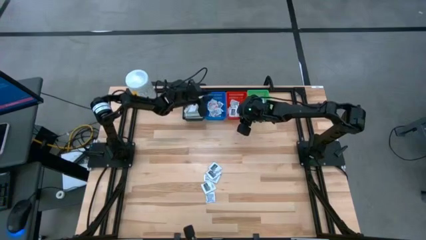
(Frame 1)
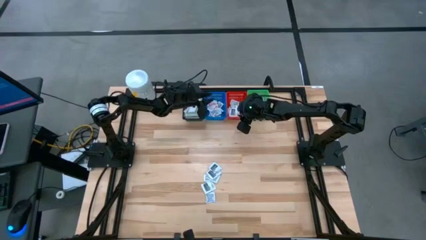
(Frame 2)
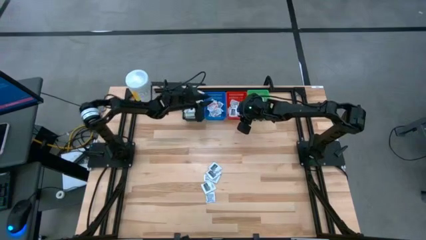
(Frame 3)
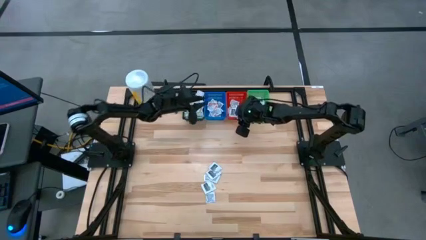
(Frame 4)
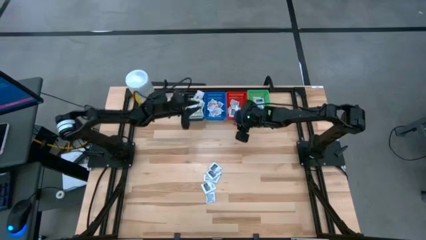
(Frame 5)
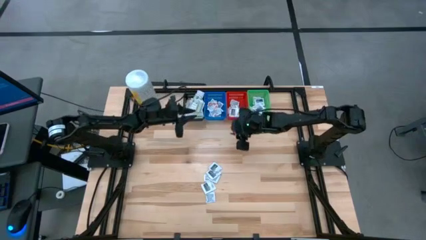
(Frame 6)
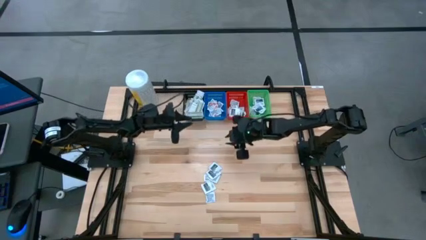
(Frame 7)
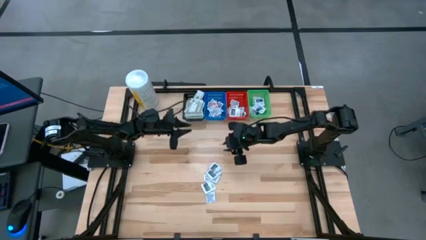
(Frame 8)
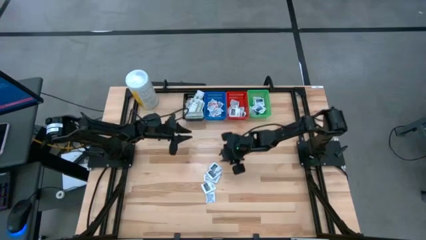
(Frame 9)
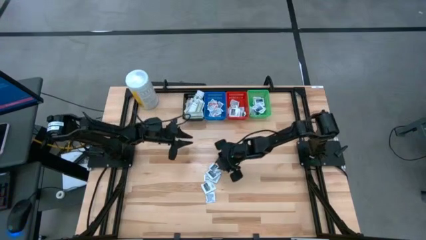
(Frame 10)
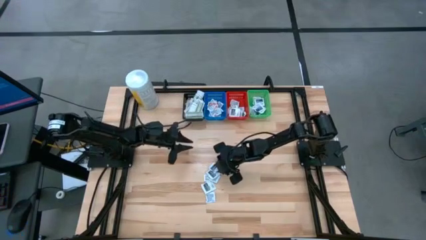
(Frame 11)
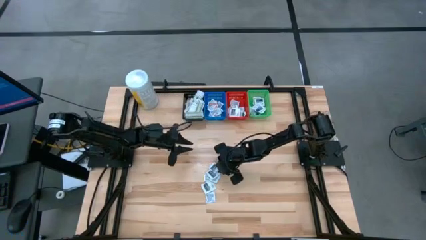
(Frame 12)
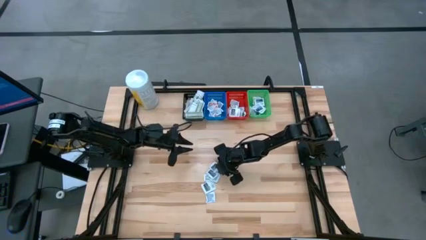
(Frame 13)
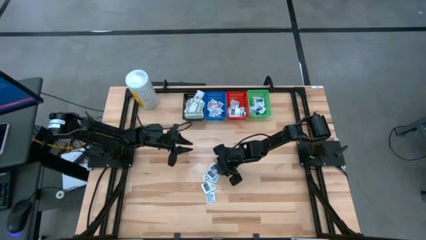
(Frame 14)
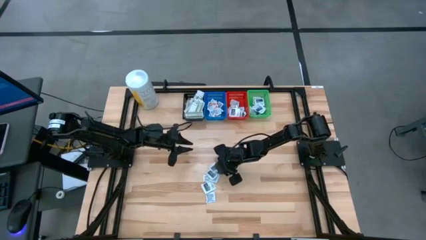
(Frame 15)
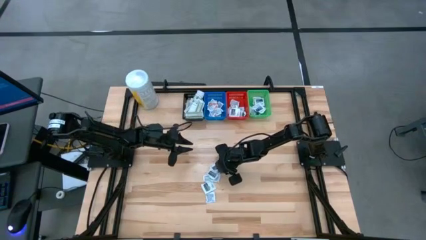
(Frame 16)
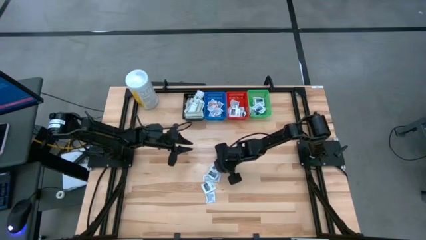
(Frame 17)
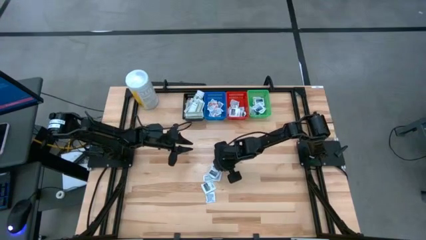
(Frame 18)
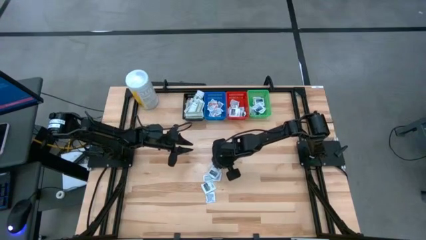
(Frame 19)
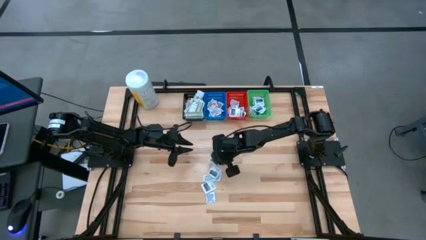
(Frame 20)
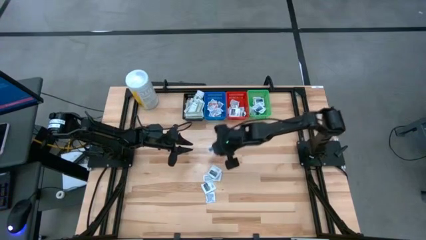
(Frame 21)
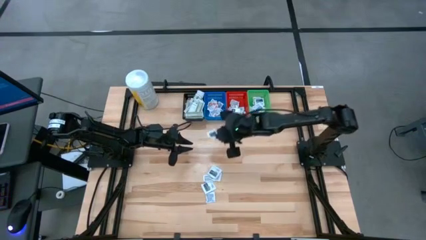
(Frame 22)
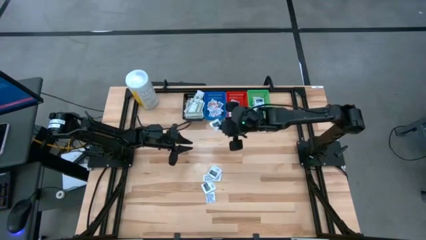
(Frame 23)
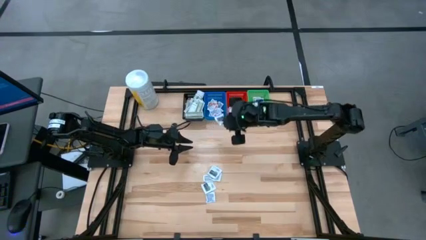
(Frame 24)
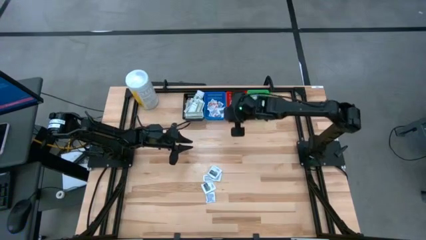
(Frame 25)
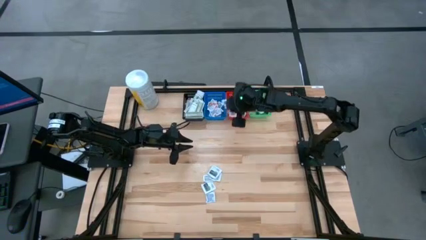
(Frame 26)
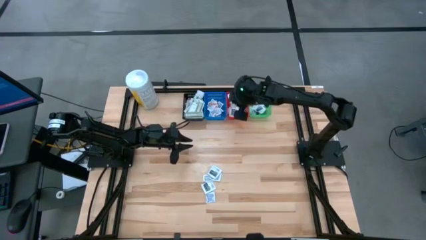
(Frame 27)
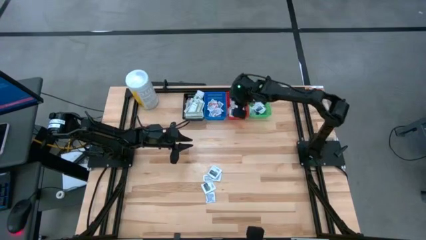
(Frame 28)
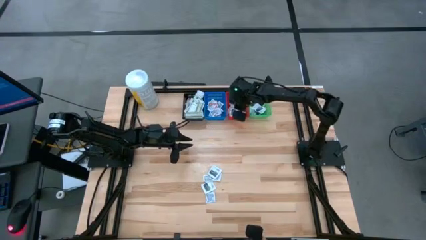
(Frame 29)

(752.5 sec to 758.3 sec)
Task: Pick & Place First Aid Supplies
Put the gray towelette pack in the red bin

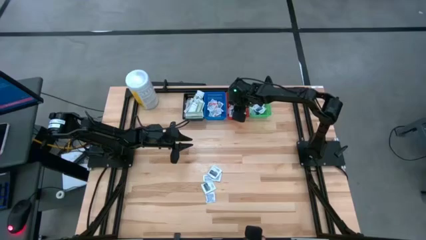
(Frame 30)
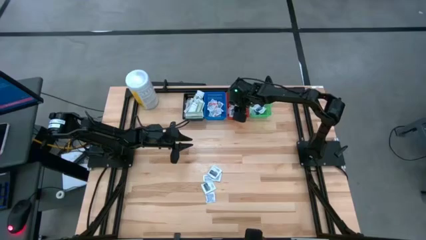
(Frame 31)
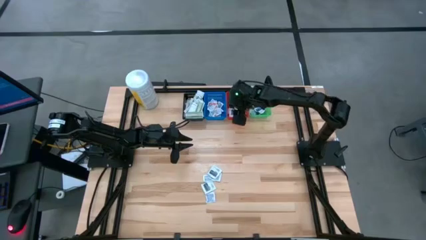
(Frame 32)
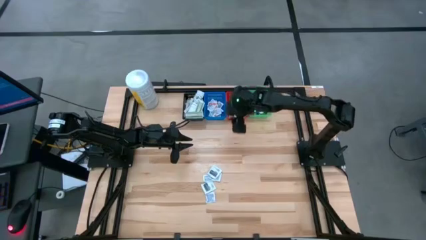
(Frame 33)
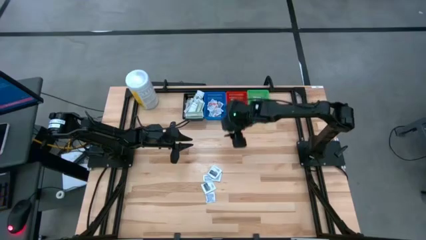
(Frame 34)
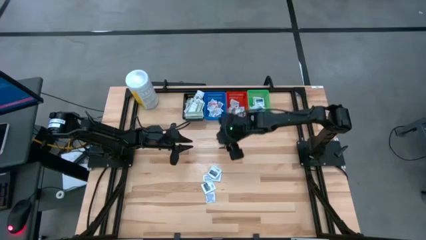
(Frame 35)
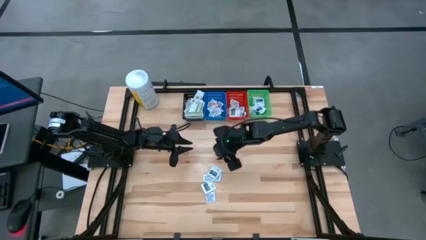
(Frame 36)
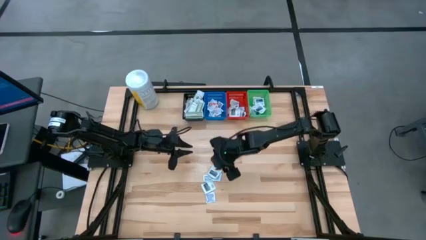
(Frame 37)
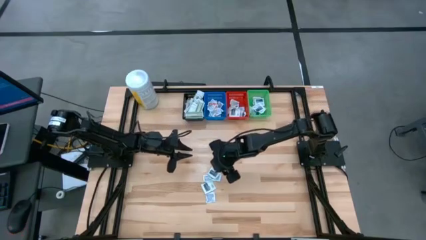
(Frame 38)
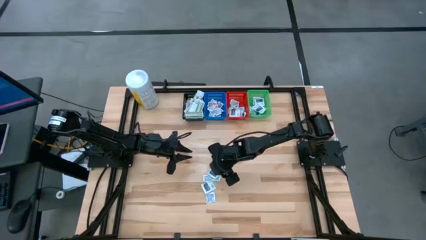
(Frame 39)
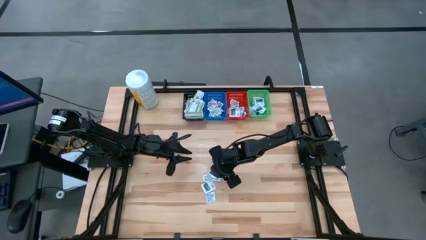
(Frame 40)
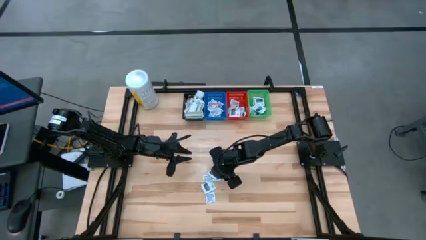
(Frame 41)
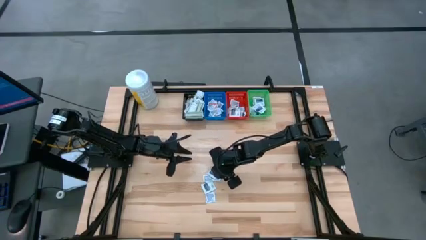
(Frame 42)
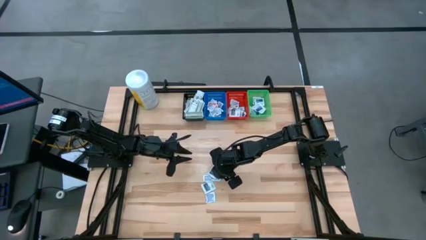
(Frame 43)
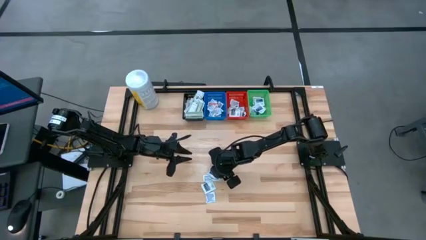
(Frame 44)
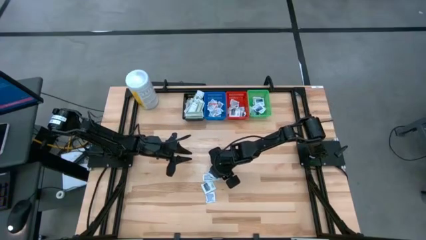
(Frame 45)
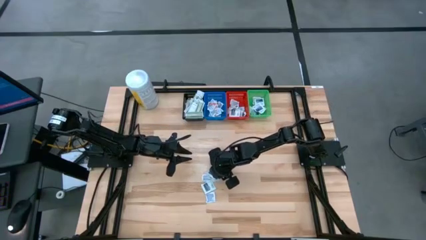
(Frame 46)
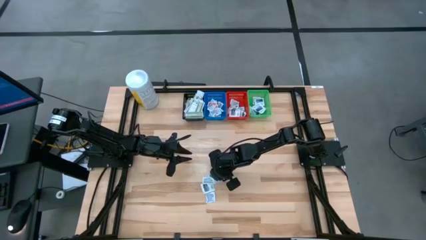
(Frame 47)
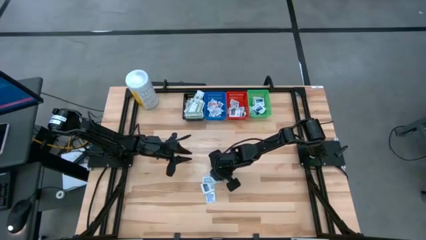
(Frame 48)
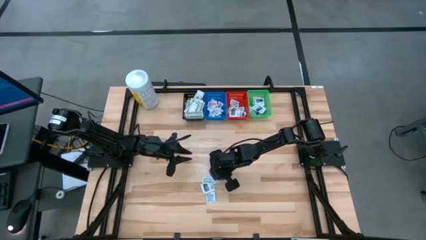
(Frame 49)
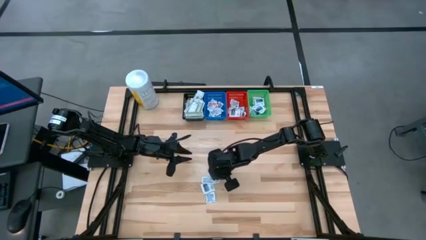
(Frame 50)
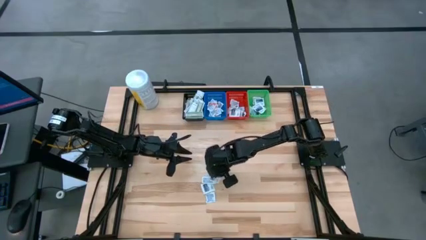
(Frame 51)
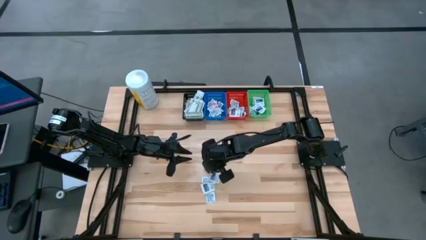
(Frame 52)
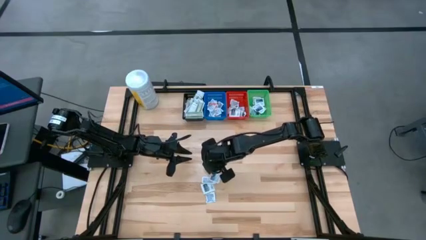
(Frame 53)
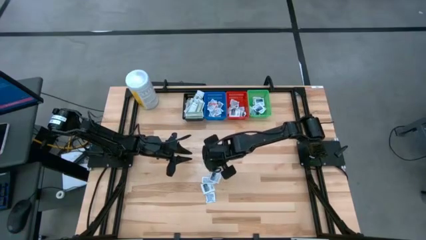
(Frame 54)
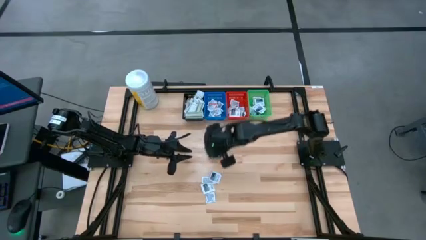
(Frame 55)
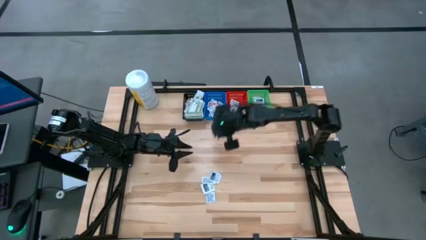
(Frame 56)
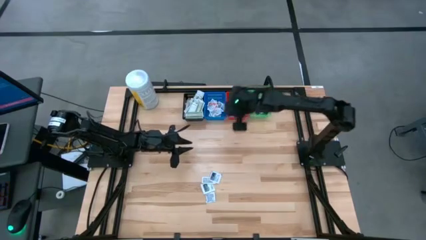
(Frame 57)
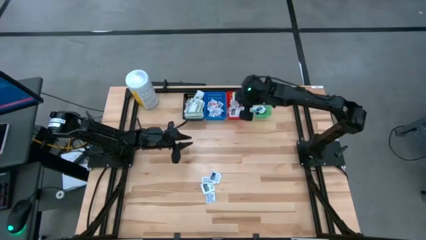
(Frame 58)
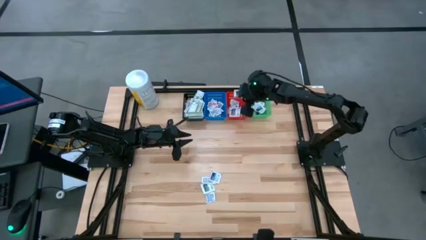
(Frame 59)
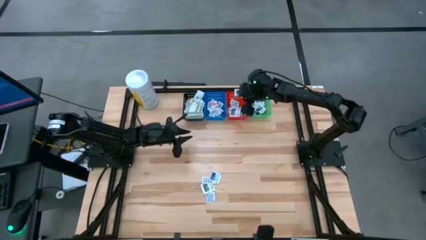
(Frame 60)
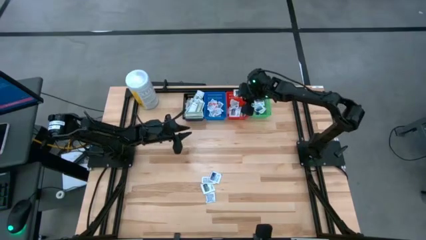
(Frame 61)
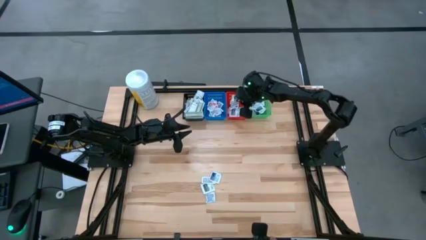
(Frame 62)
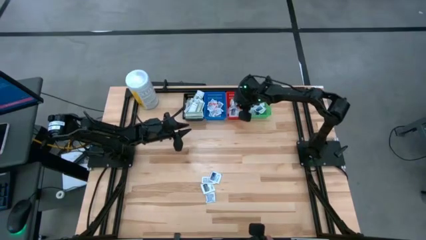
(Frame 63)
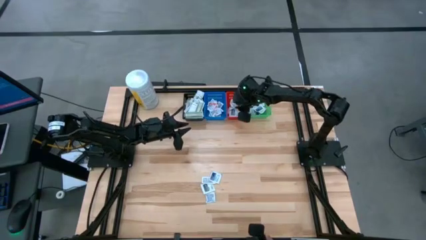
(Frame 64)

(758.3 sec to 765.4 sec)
Put the gray towelette pack in the red bin

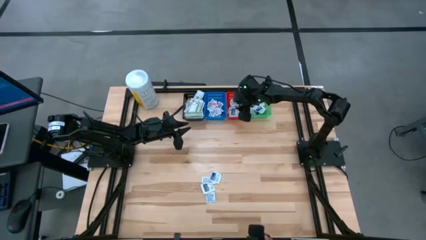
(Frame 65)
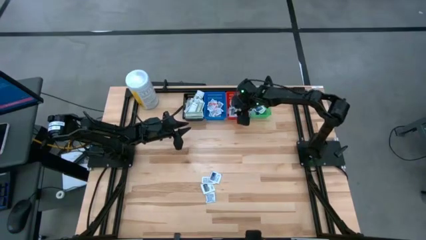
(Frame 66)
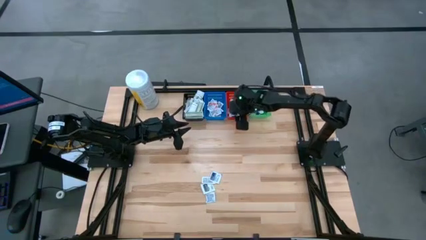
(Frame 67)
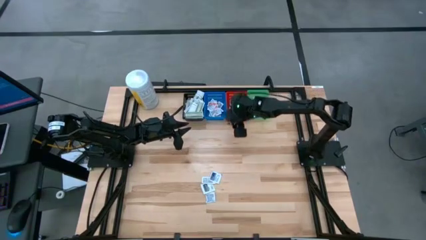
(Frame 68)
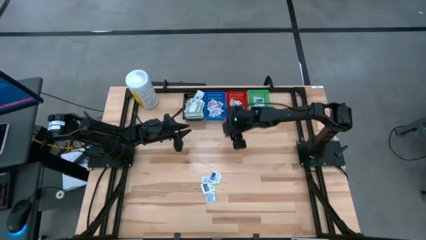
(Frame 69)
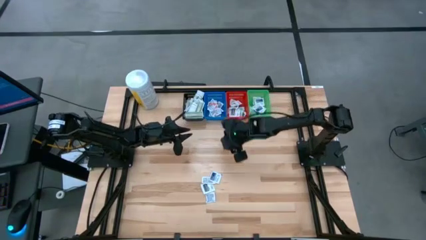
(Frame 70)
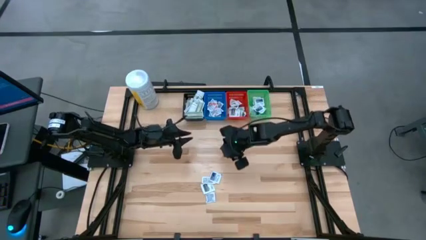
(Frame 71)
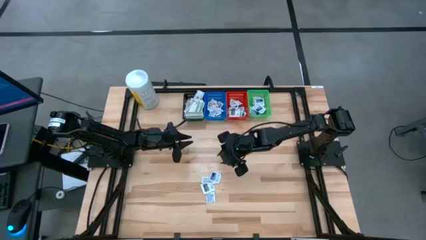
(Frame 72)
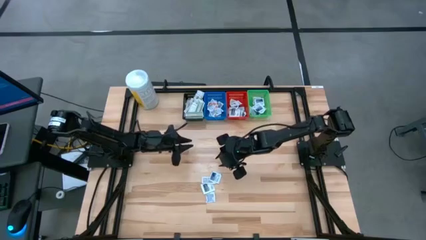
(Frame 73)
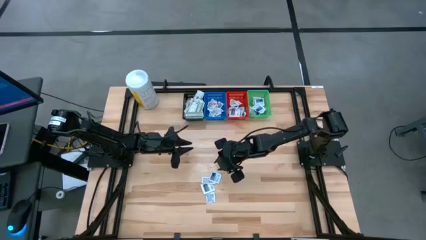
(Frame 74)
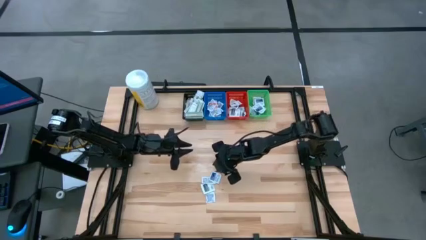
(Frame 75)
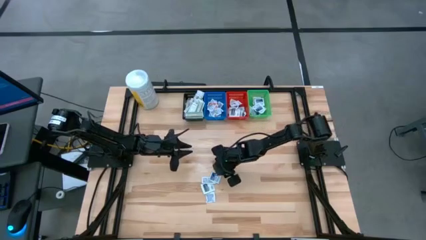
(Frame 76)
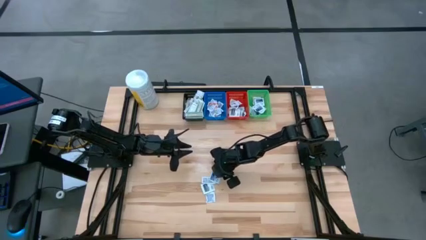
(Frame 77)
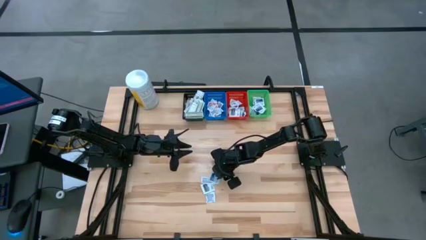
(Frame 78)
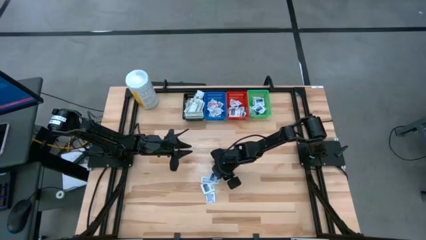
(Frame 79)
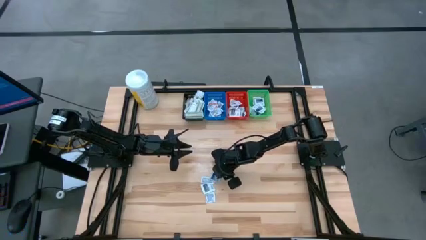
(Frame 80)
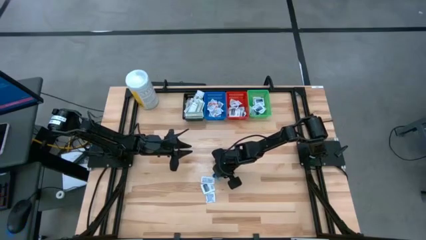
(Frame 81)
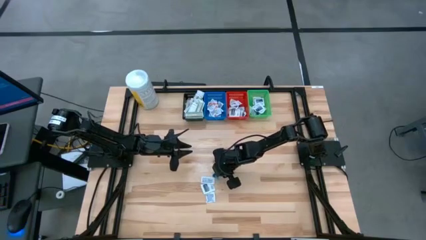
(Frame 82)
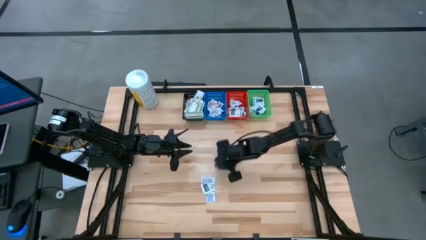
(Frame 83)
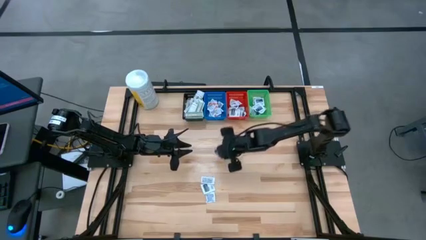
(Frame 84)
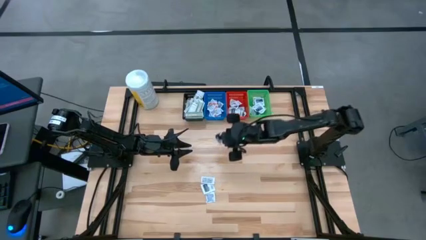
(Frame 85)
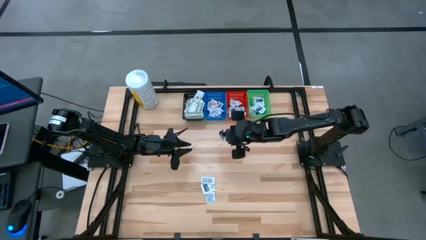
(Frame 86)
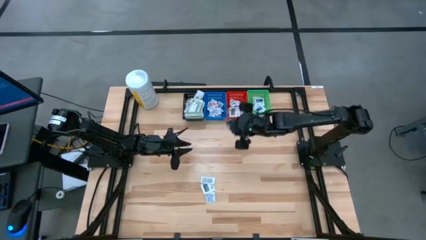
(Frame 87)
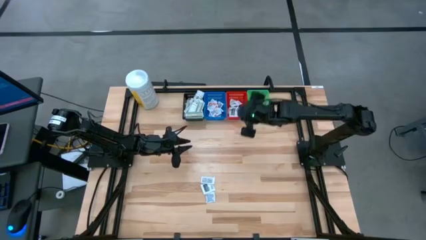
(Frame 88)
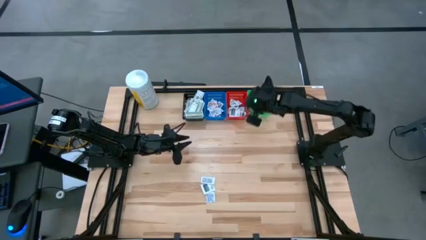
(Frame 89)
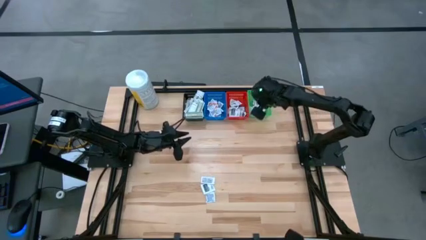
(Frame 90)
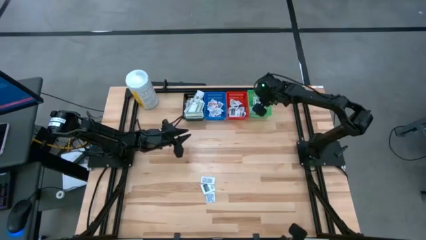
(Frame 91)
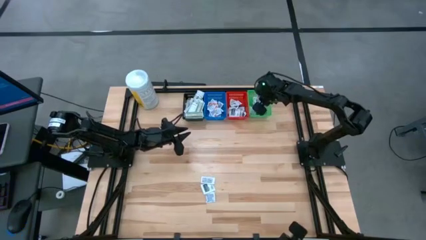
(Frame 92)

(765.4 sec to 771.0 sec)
Put the blue alcohol pad in the green bin
